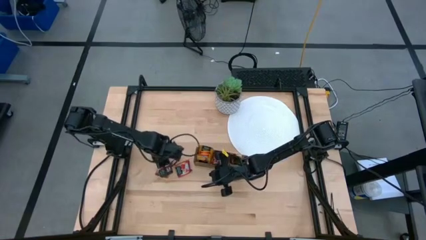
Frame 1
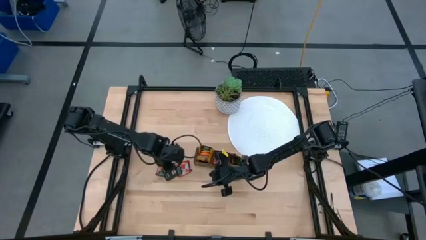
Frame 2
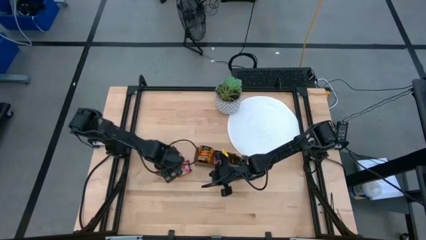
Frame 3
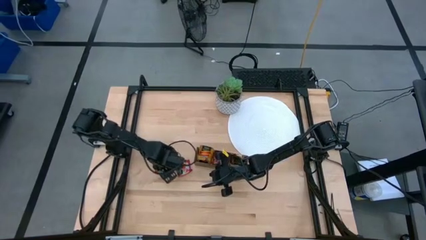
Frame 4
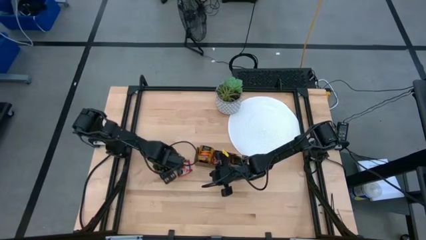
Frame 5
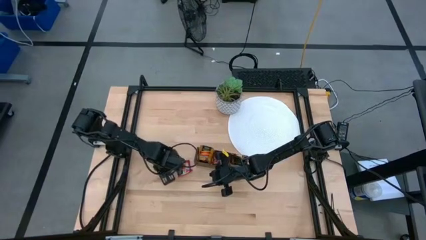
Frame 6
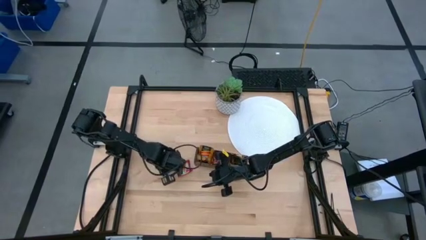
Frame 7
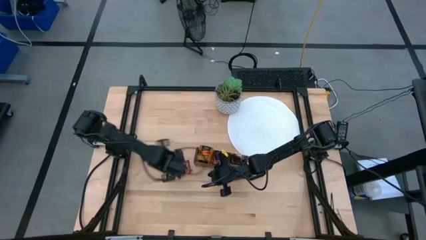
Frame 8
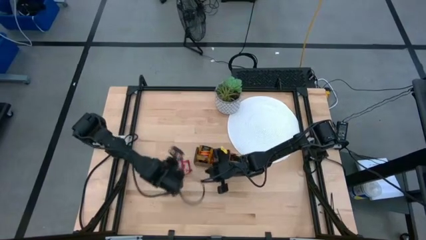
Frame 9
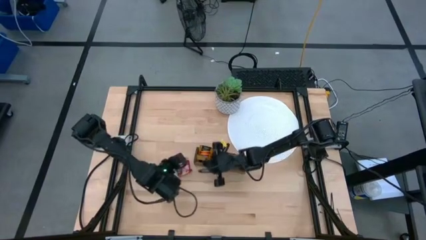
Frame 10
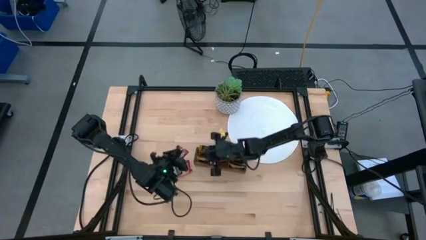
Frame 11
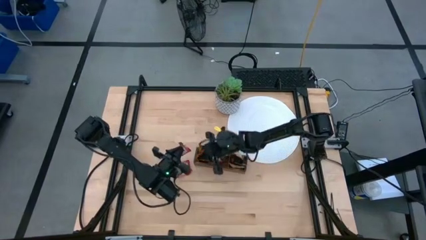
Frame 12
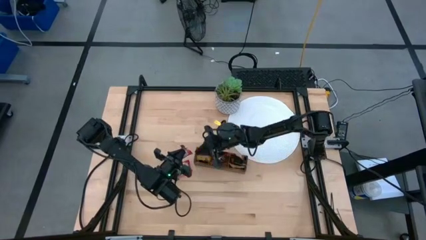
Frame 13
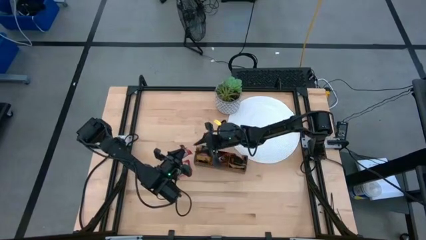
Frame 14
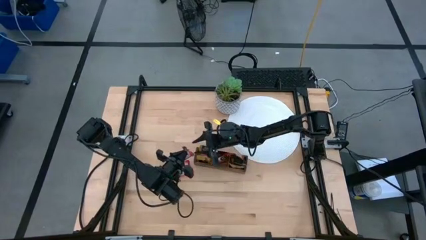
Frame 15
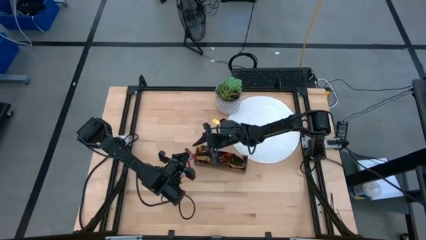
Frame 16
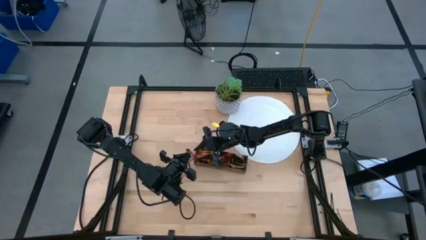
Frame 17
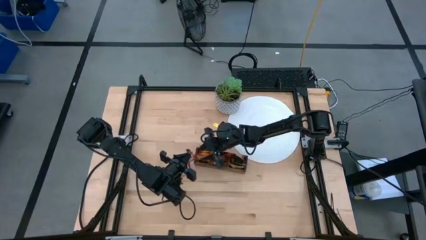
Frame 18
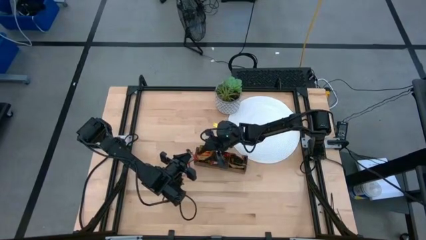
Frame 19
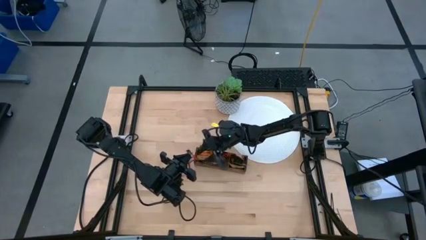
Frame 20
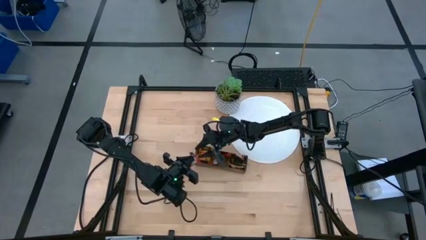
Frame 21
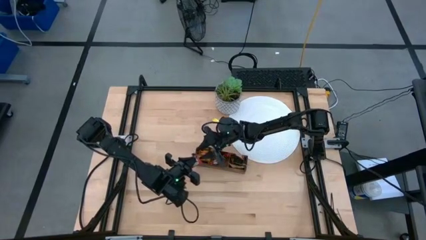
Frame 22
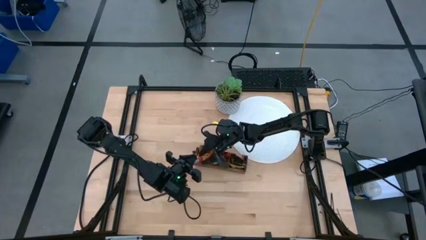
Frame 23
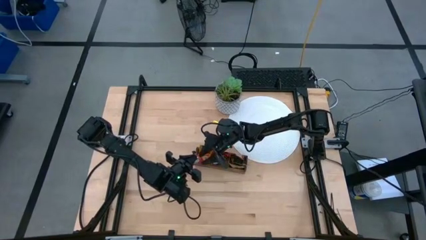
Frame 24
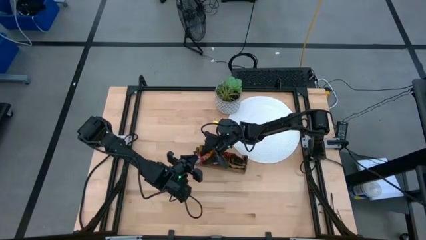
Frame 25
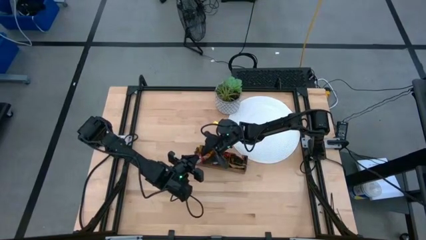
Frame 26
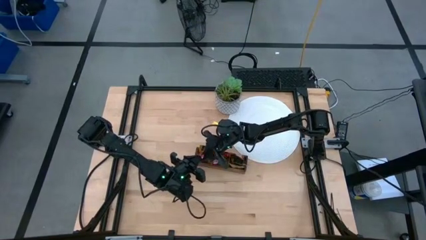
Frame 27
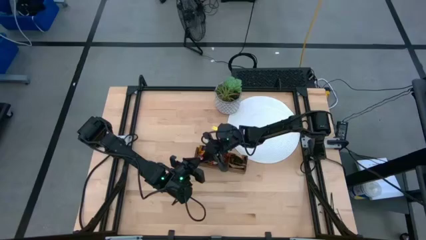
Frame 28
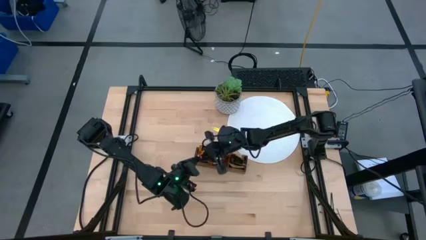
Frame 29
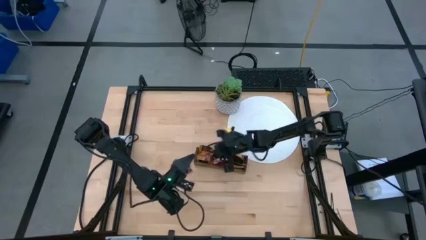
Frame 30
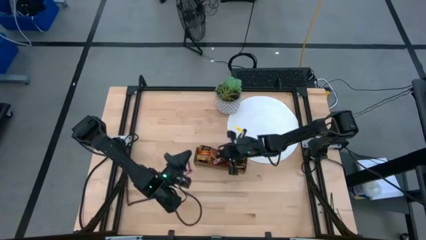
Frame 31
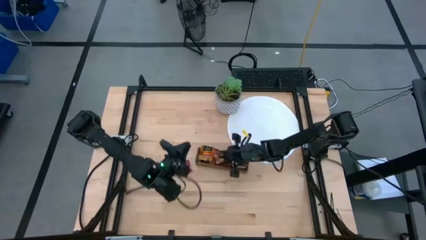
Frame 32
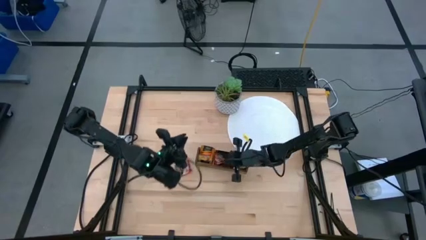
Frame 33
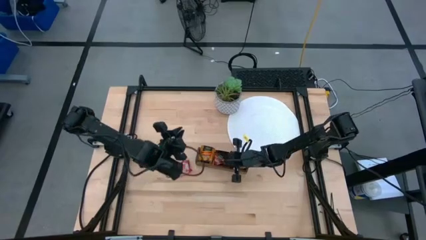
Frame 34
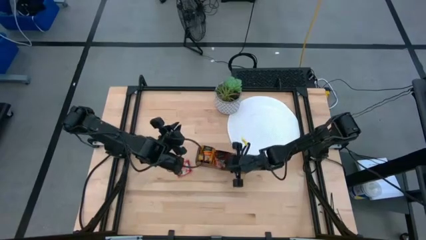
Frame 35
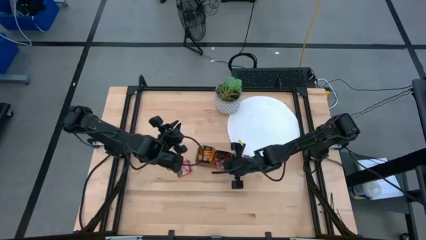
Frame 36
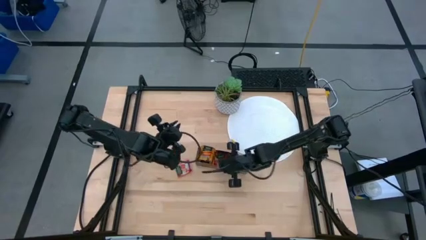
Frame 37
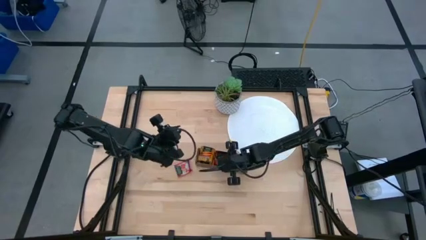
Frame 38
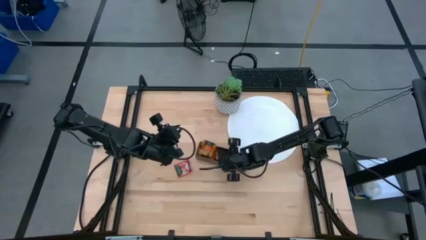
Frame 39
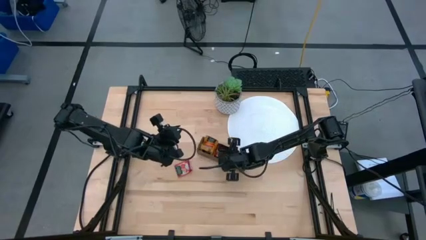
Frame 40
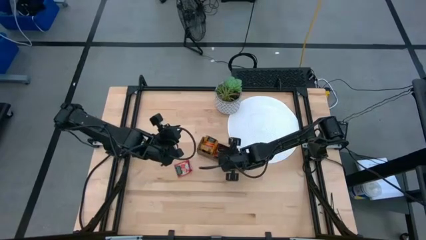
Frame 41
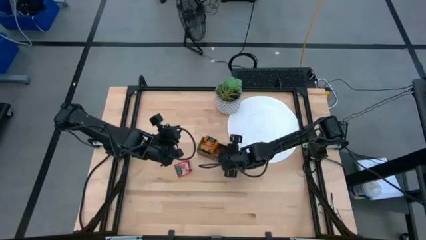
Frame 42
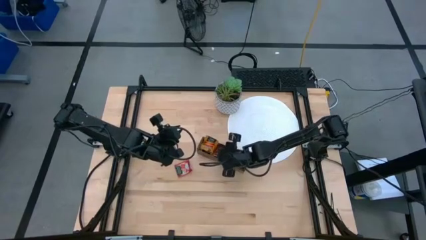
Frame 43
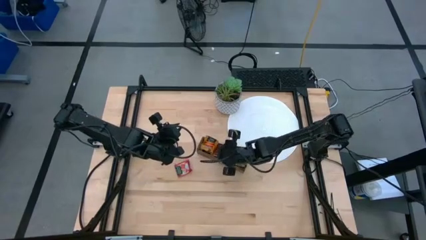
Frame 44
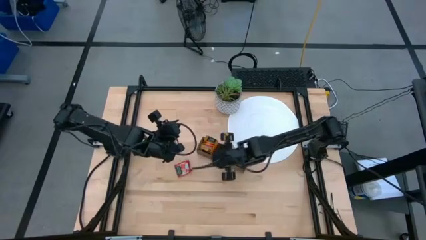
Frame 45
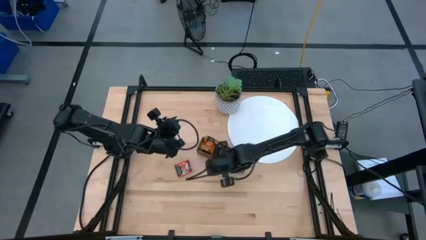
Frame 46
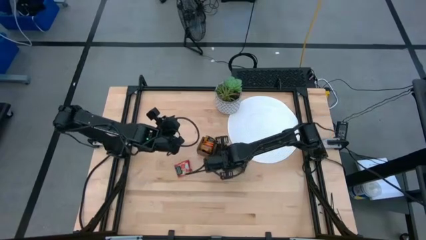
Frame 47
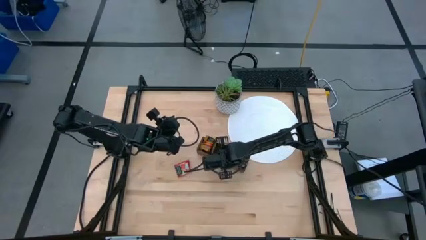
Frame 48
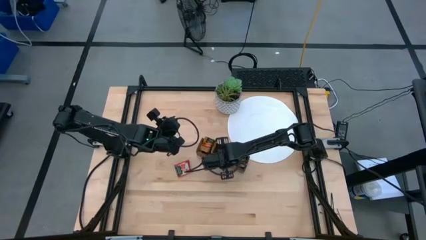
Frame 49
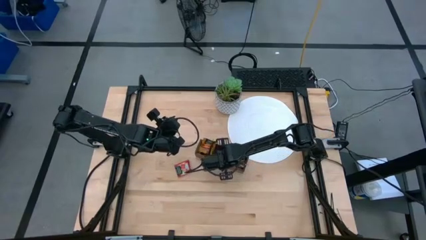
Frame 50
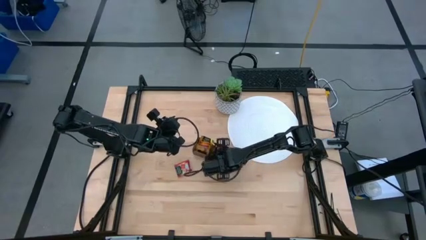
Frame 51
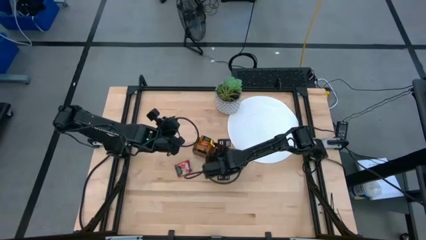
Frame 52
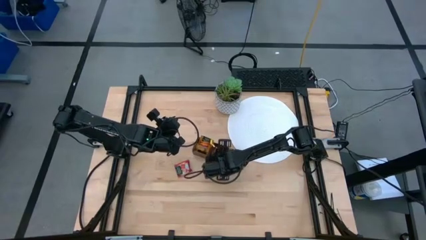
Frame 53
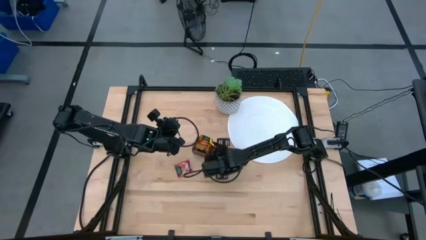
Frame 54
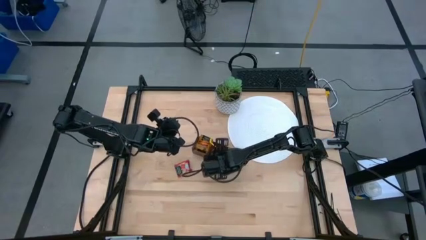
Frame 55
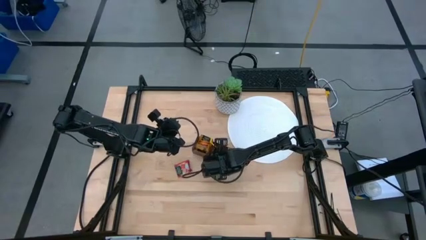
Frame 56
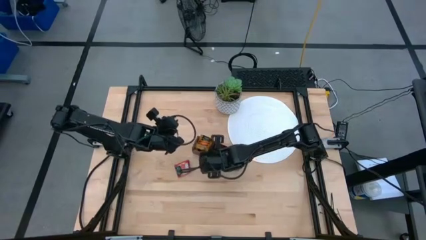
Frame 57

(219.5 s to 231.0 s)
Task: Pick & Place Tea
Put the red tea bag into the middle section of the wooden organizer

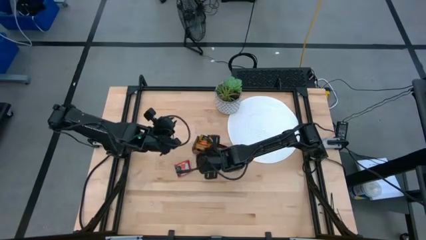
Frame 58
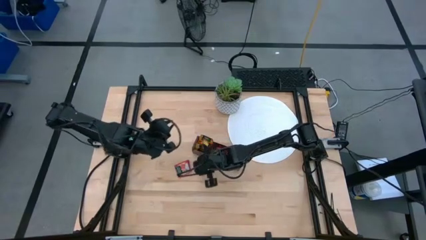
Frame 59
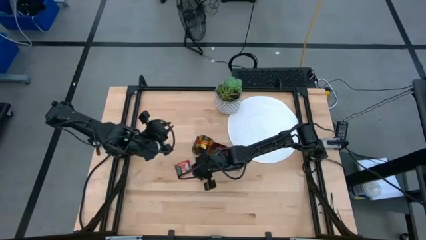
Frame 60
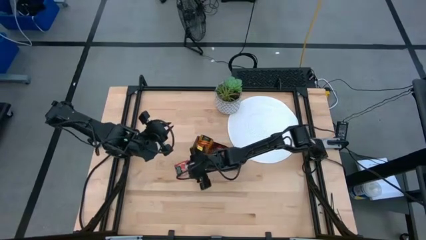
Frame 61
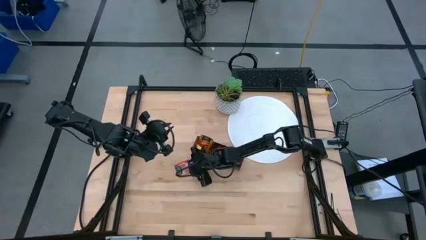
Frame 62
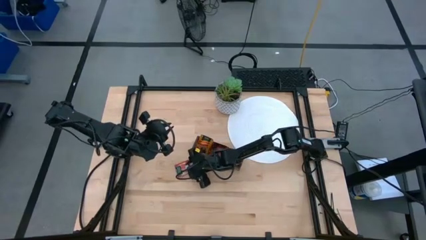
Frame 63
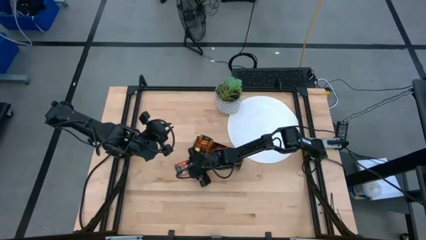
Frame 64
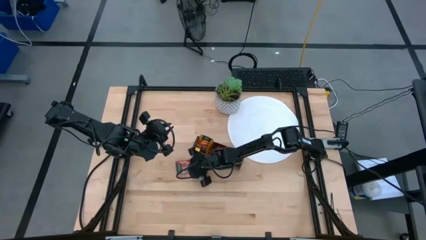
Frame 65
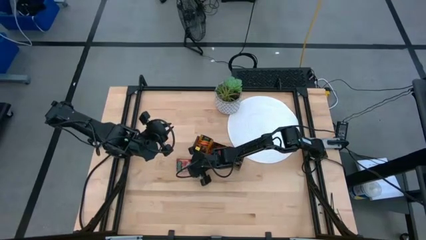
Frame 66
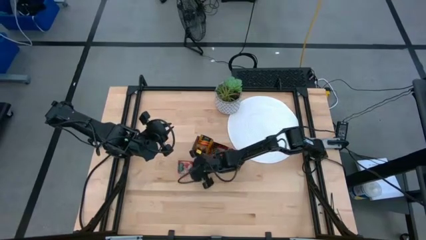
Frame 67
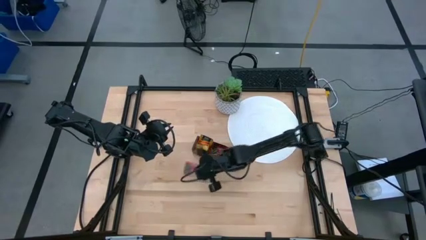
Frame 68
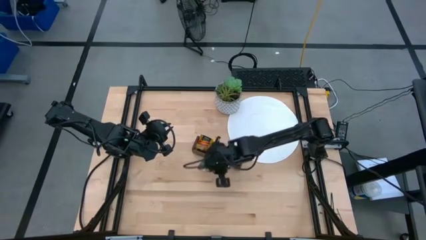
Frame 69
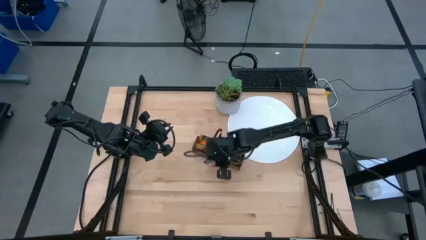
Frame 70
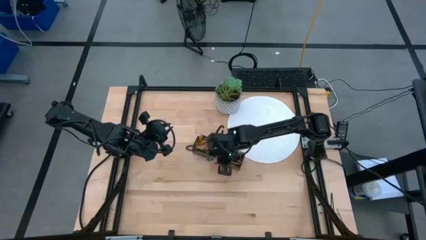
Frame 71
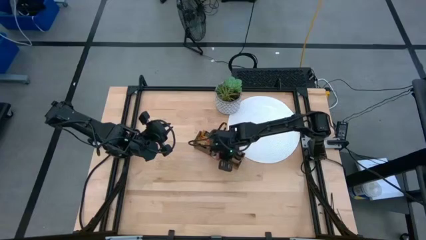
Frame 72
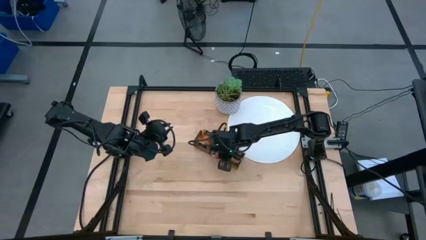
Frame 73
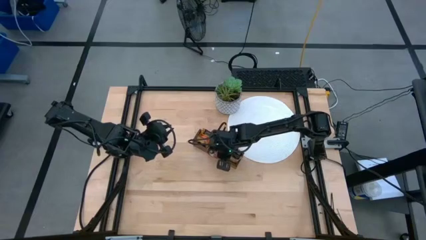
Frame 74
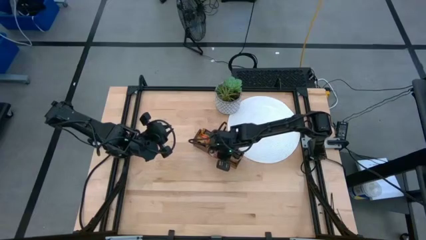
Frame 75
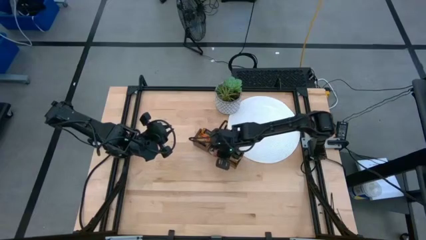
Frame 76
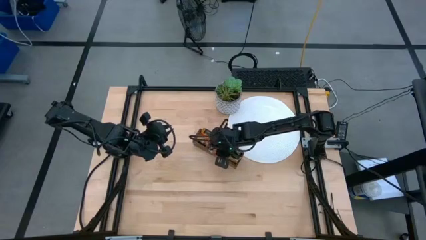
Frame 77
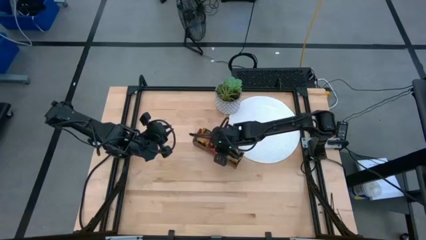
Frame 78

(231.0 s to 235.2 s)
Put the red tea bag into the middle section of the wooden organizer

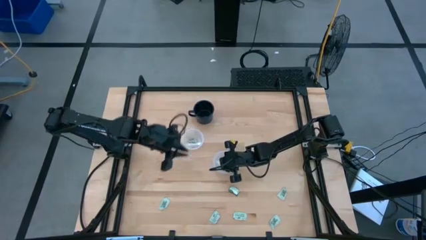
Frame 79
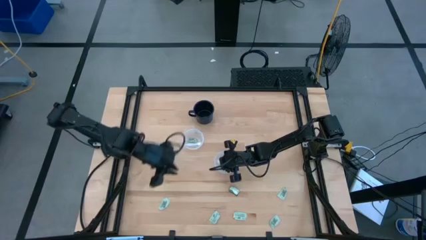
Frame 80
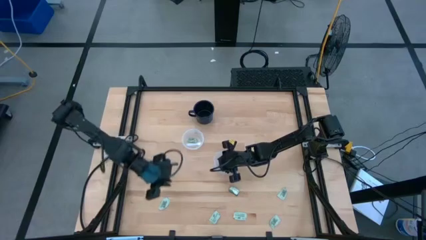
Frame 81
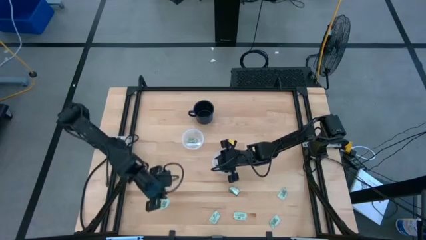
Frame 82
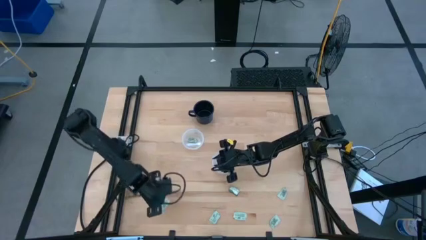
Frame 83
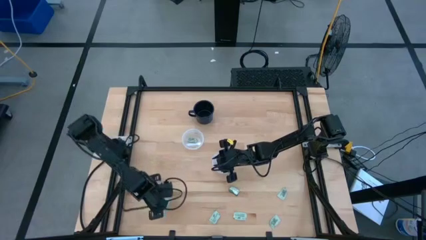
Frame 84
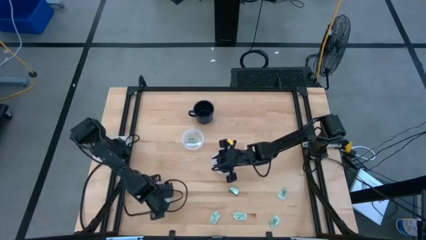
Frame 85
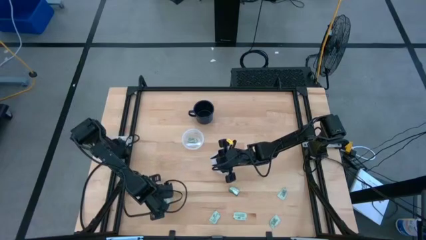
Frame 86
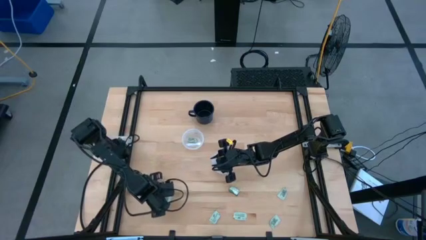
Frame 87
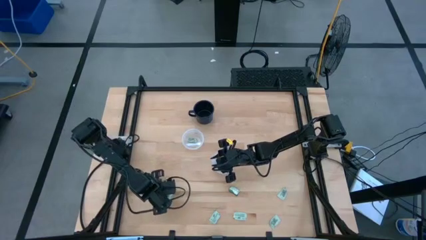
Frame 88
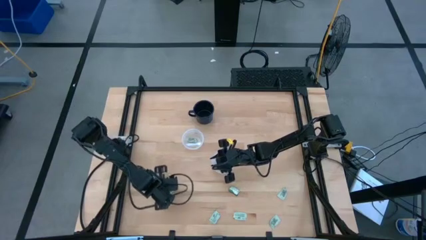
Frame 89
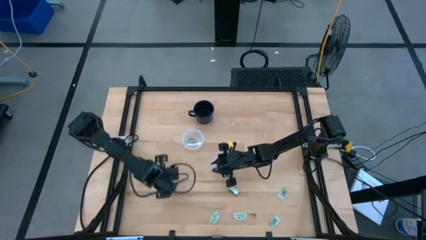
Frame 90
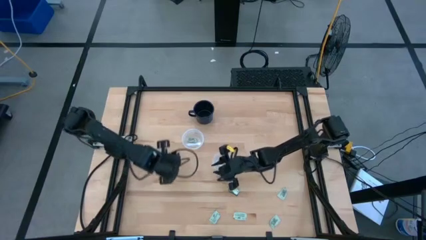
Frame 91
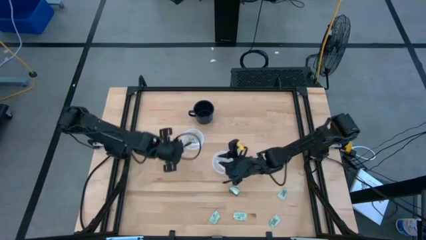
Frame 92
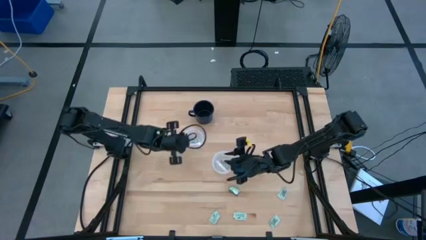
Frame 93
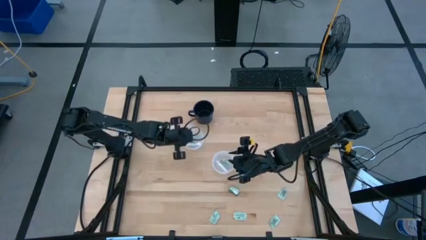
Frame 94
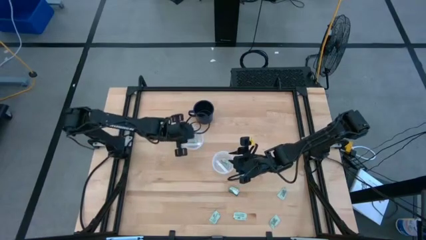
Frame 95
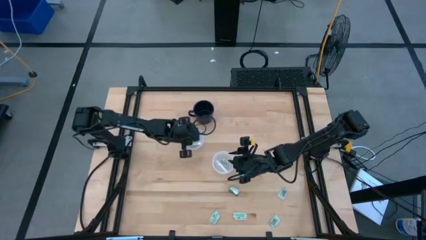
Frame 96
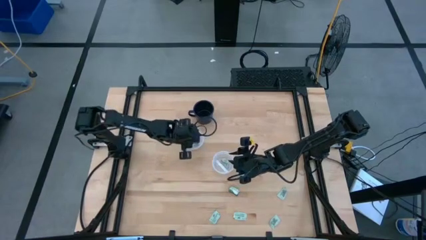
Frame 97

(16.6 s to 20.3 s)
Task: Pick and place Stevia / Truvia into bins
Put the stevia packet into the top round transparent container
